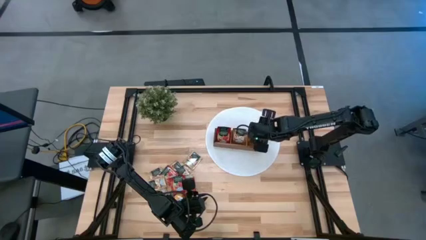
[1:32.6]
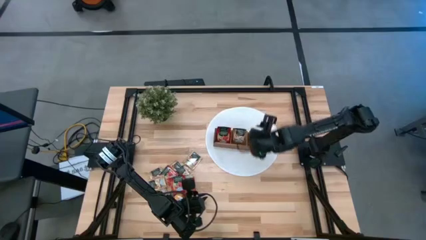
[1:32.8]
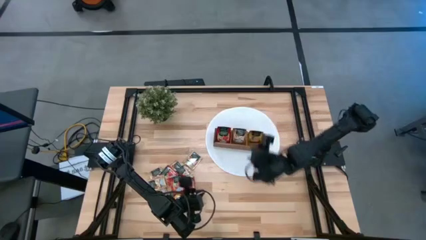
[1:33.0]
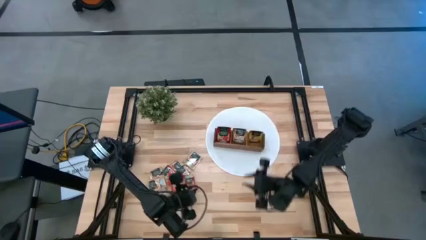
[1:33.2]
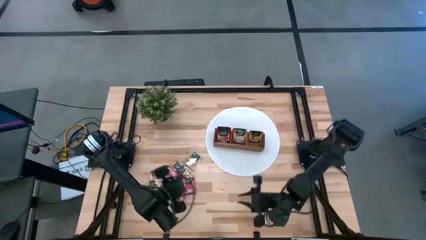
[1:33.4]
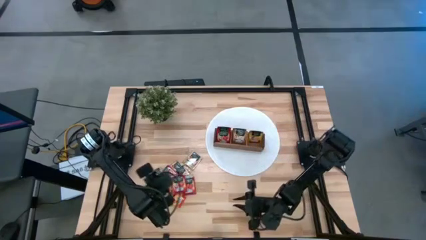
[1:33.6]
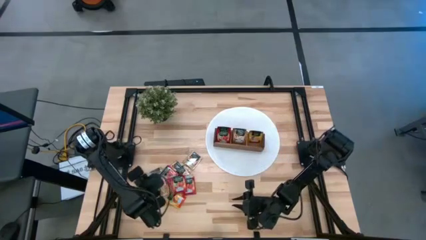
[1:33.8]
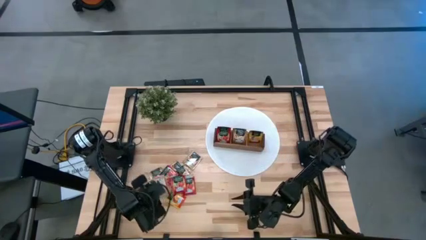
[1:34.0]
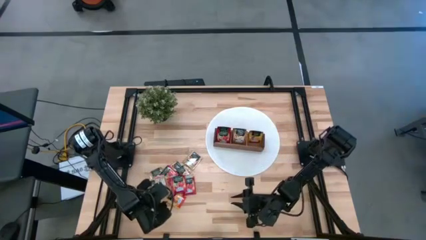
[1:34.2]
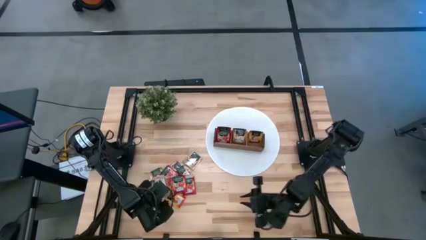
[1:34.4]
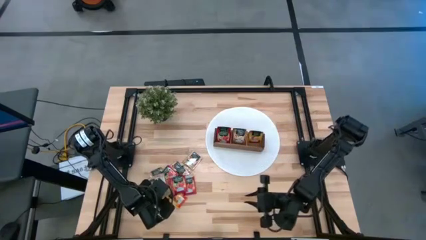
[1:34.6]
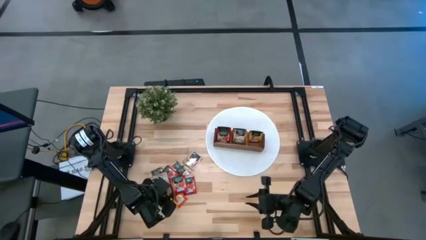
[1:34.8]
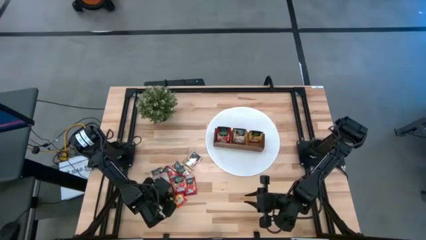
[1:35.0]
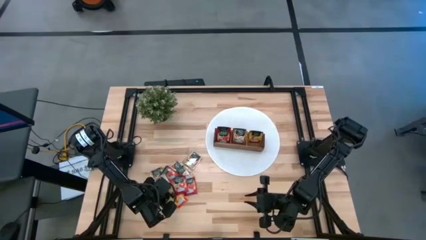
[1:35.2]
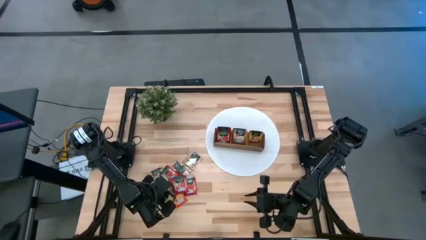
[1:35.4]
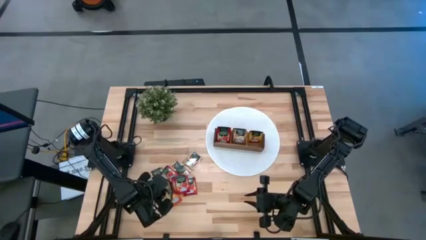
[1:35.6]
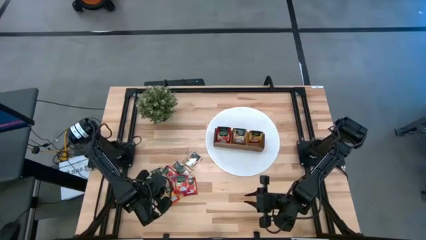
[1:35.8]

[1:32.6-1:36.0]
Task: Pick & Place Tea
Put the yellow tea bag into the right section of the wooden organizer

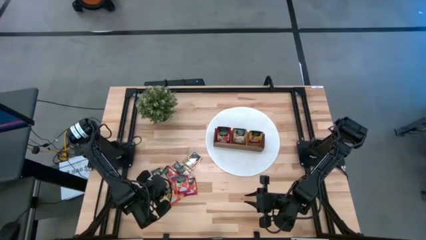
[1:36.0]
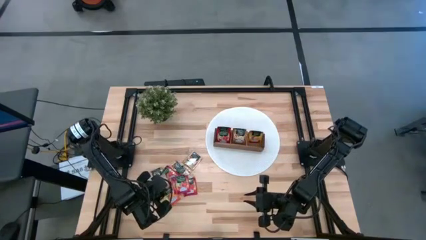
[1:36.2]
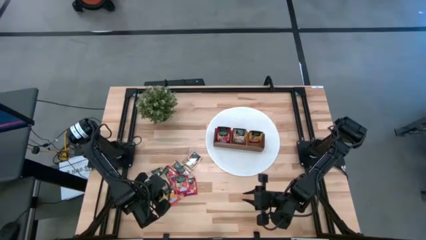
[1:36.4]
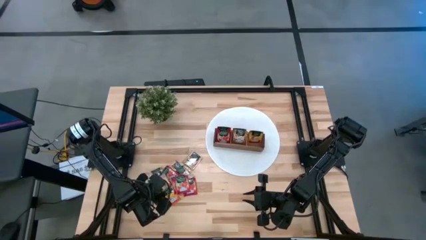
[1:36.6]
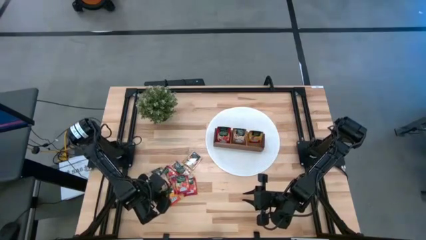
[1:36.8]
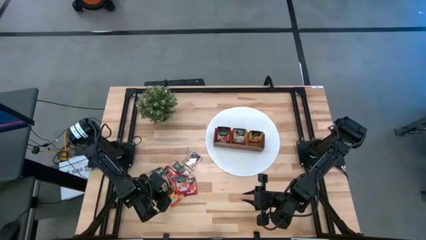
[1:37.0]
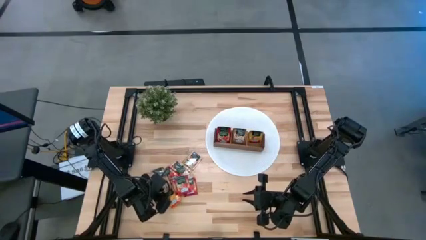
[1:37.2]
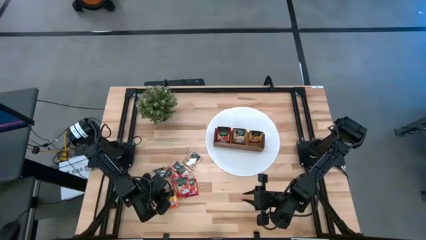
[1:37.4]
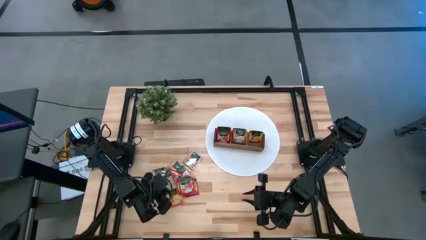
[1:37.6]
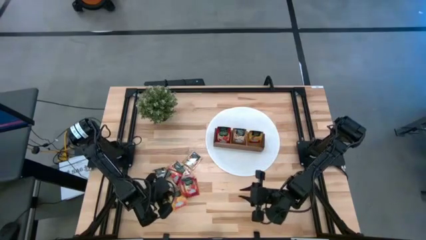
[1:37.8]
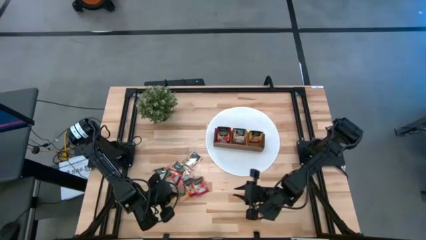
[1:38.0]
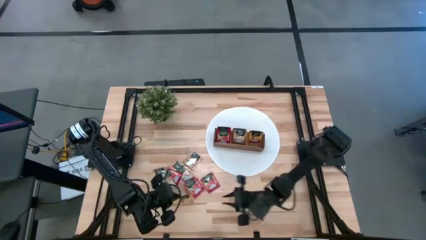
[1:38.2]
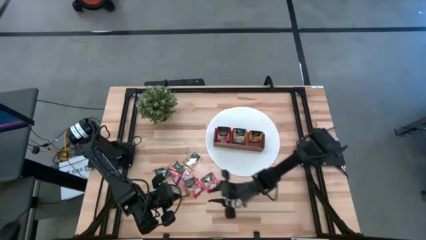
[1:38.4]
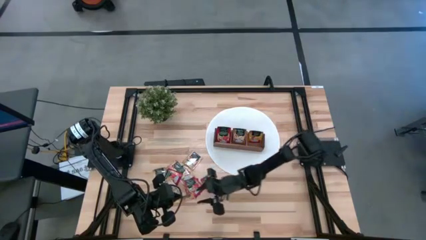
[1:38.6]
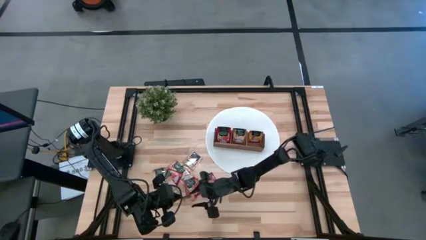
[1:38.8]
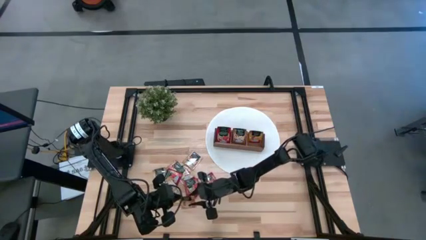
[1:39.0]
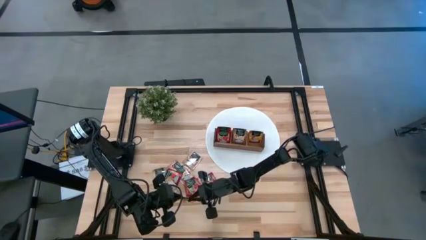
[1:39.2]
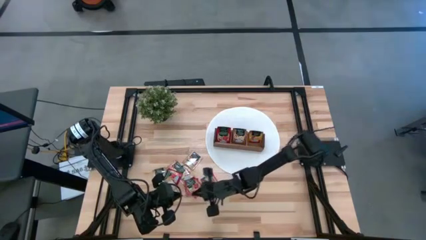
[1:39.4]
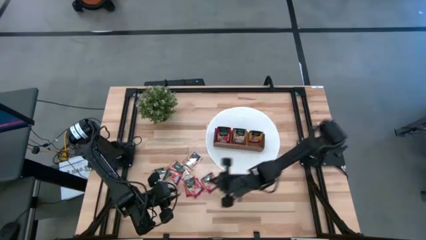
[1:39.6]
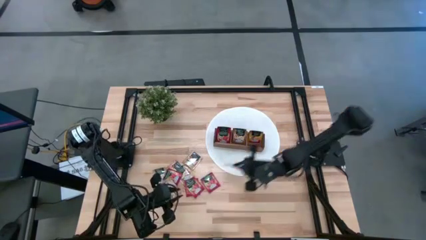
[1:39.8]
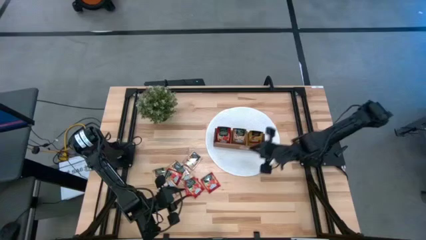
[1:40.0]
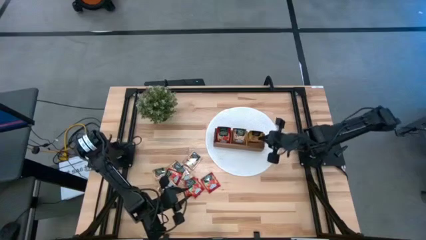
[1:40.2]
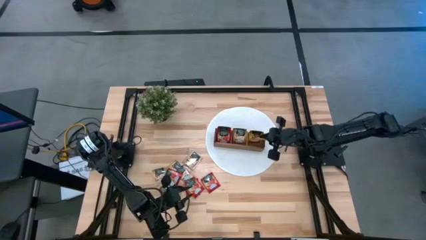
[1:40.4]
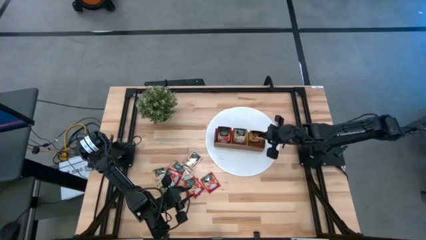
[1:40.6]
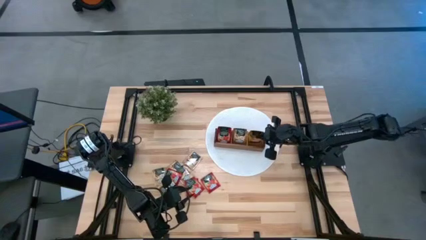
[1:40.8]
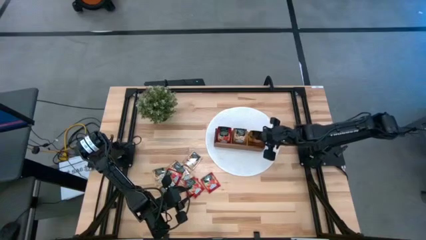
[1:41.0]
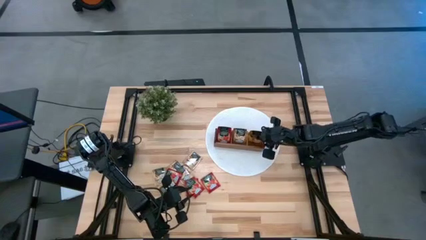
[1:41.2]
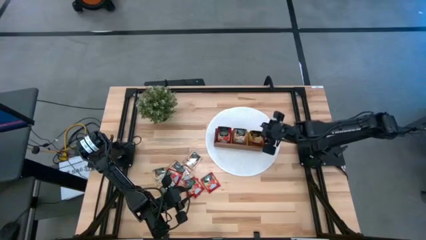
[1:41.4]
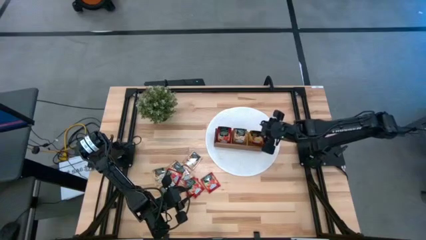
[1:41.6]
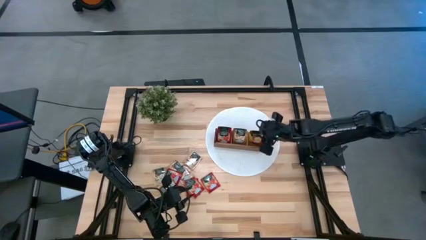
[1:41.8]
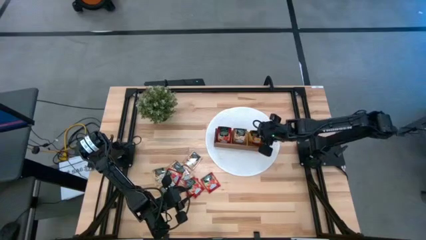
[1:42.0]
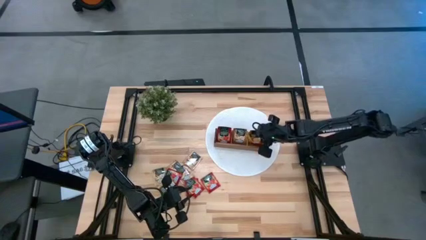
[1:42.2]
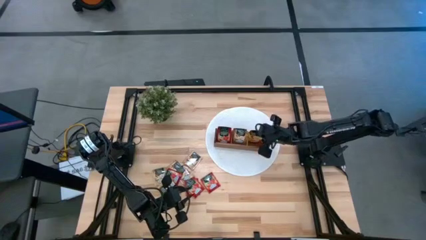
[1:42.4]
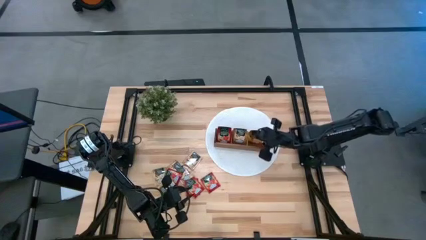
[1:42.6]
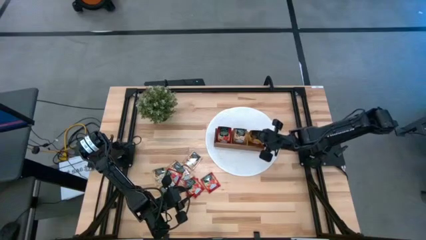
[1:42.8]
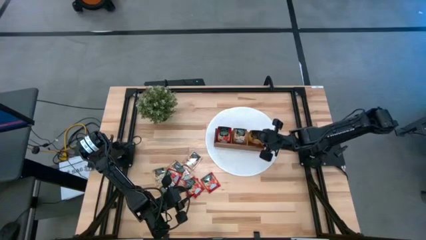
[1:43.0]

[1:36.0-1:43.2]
Put the yellow tea bag into the right section of the wooden organizer

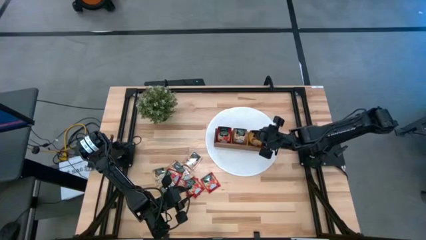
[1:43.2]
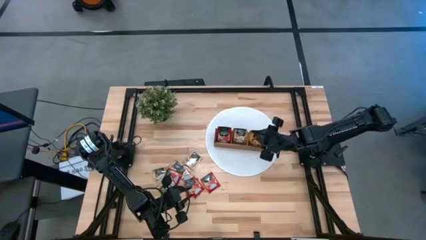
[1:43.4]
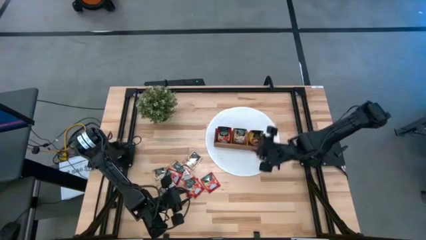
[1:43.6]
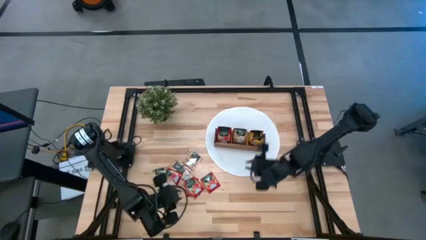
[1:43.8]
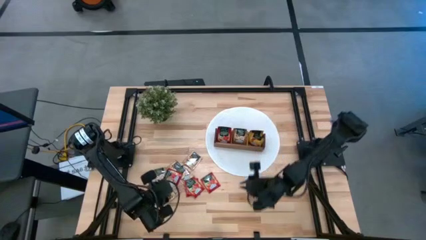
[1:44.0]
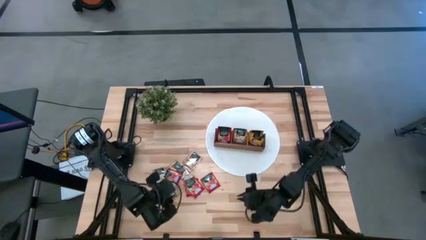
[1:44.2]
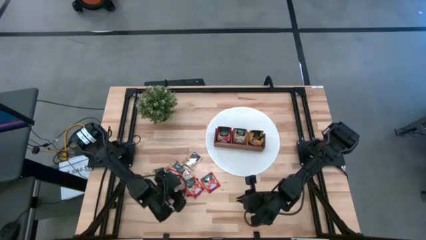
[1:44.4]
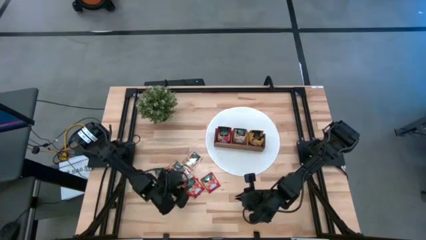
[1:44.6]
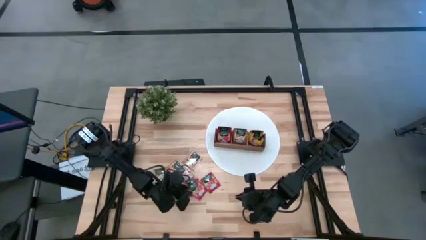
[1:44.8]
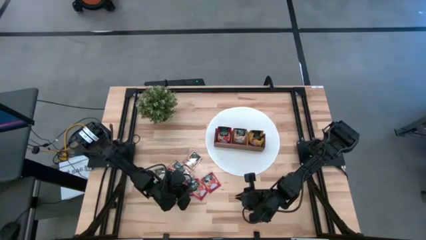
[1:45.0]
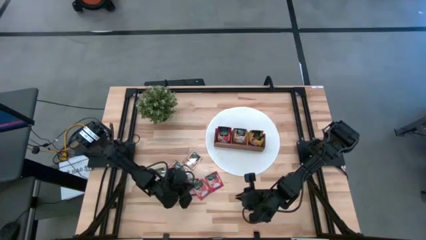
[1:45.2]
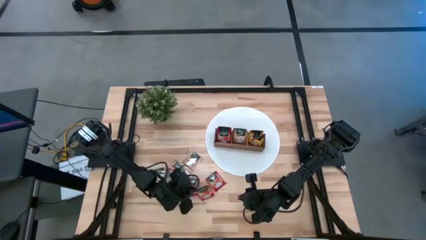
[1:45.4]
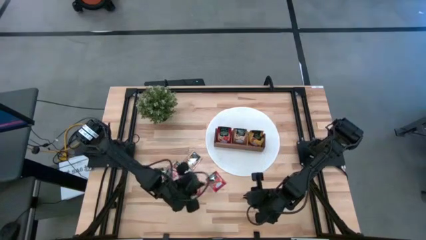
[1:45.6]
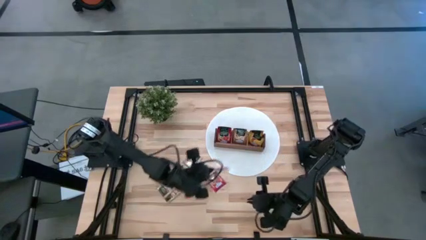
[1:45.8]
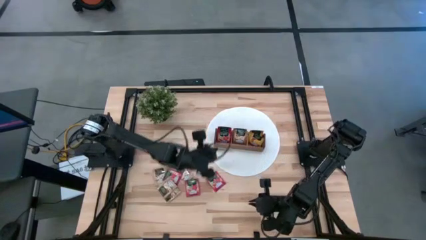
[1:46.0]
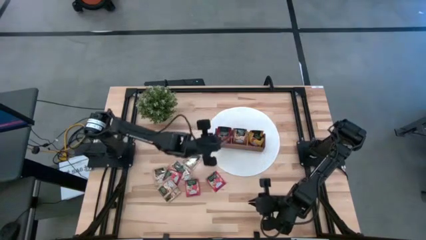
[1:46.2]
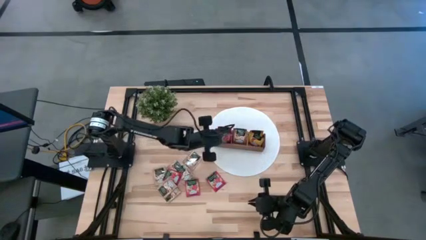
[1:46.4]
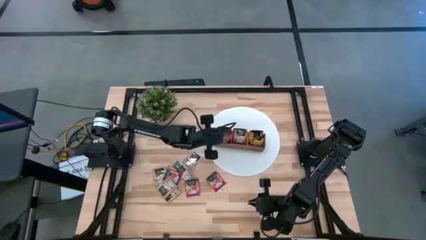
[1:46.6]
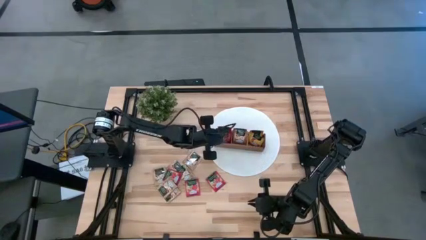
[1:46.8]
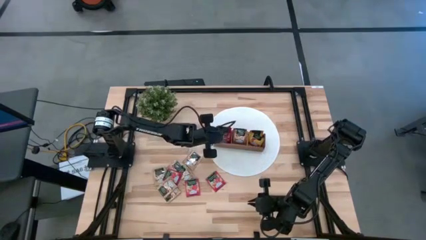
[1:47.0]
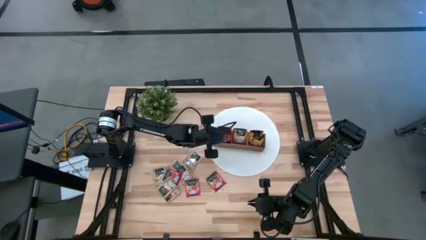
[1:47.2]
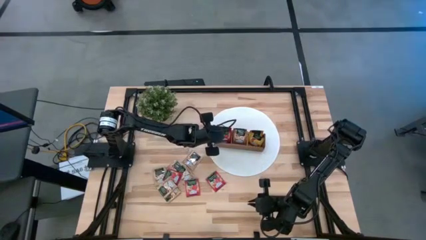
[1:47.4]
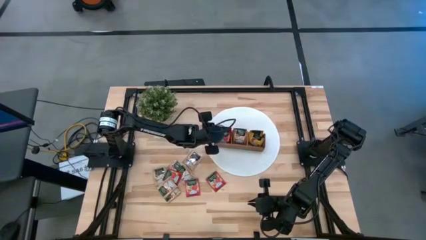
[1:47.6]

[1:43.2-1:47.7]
Put the red tea bag into the left section of the wooden organizer

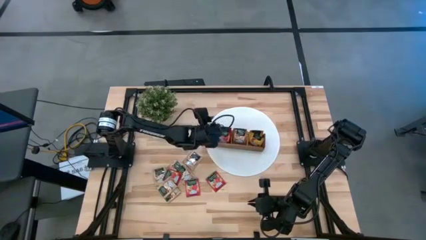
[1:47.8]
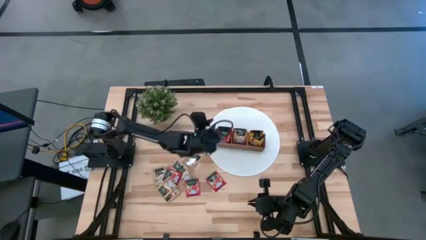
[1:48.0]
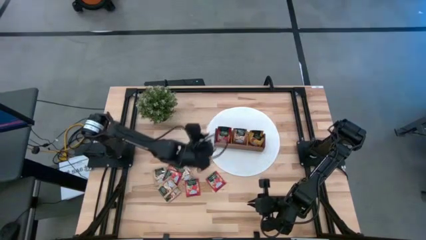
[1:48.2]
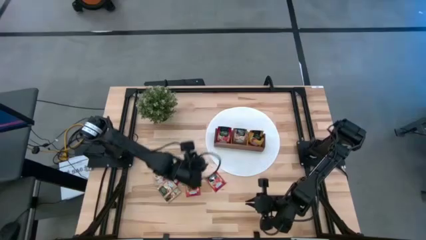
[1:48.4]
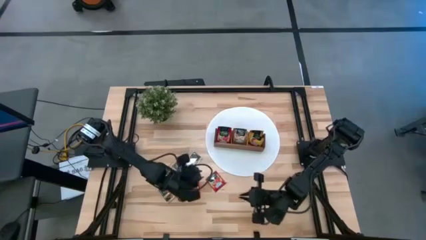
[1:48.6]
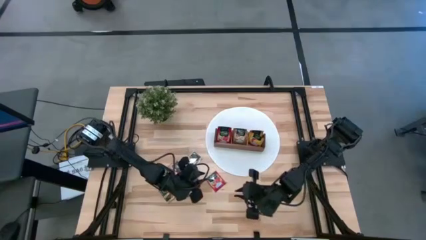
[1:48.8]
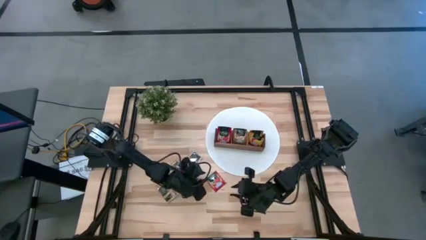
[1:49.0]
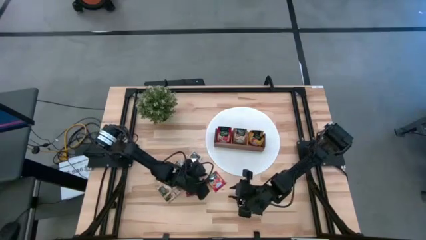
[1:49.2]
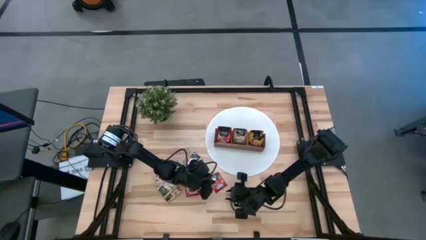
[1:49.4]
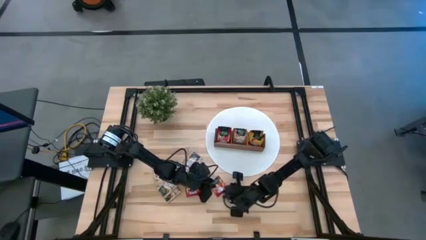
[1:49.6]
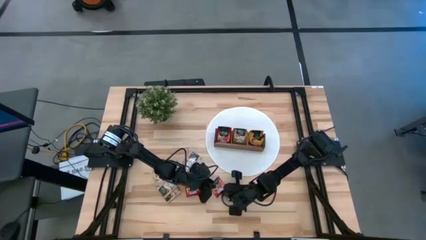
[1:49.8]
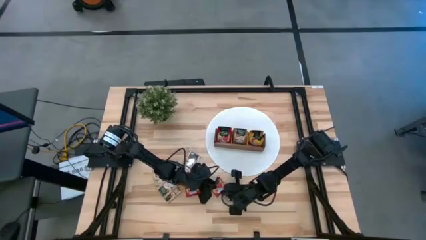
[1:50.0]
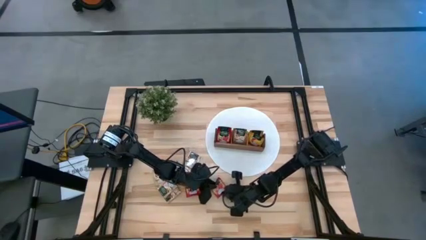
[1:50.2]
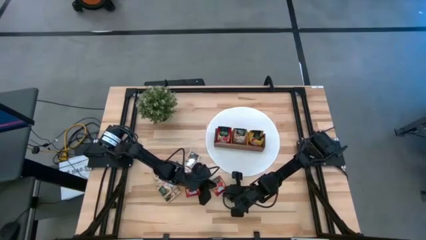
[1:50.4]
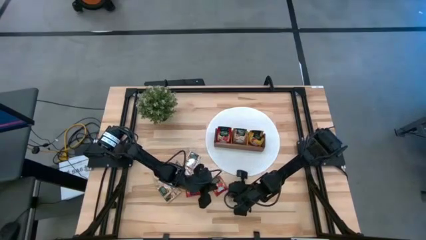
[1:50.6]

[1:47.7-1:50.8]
Put the red tea bag into the left section of the wooden organizer
